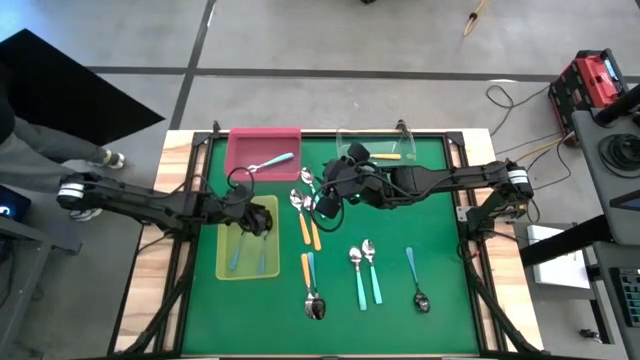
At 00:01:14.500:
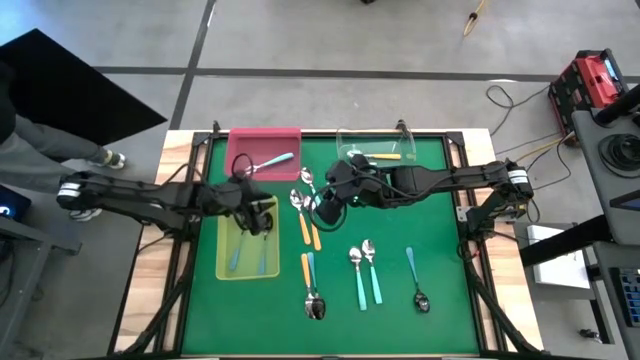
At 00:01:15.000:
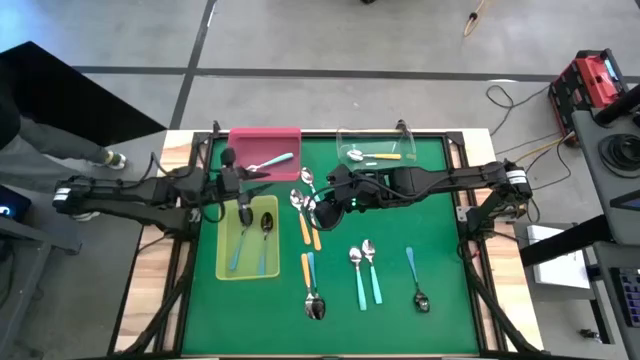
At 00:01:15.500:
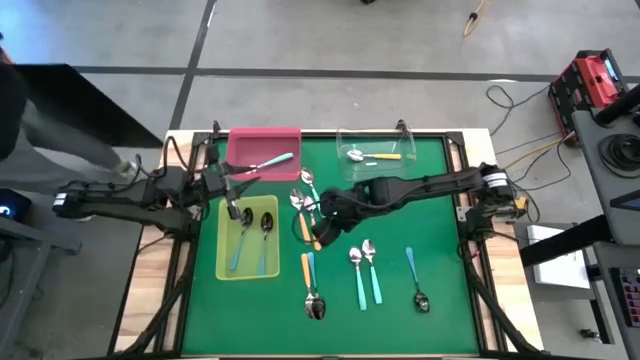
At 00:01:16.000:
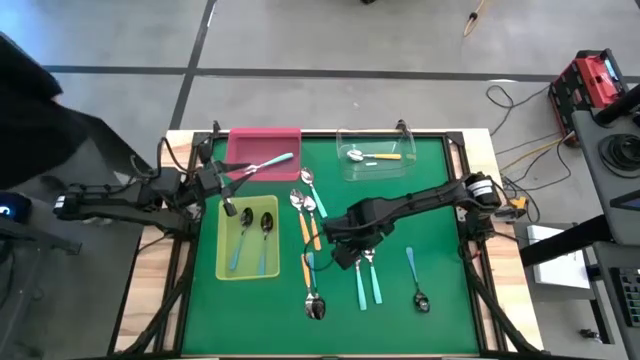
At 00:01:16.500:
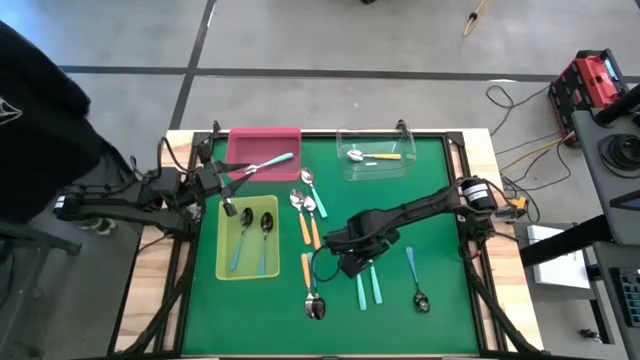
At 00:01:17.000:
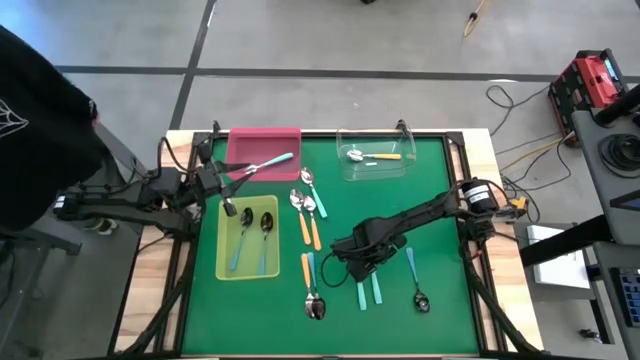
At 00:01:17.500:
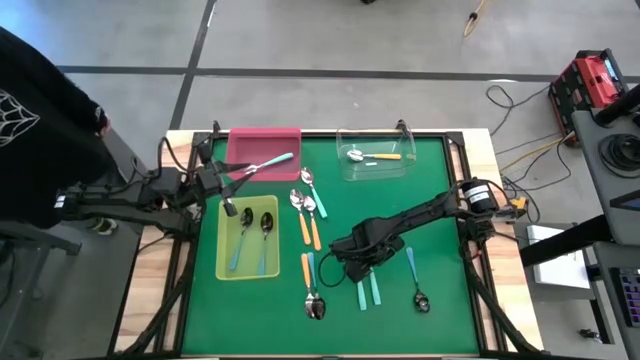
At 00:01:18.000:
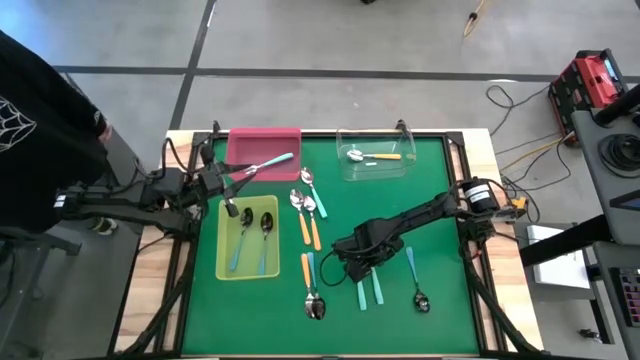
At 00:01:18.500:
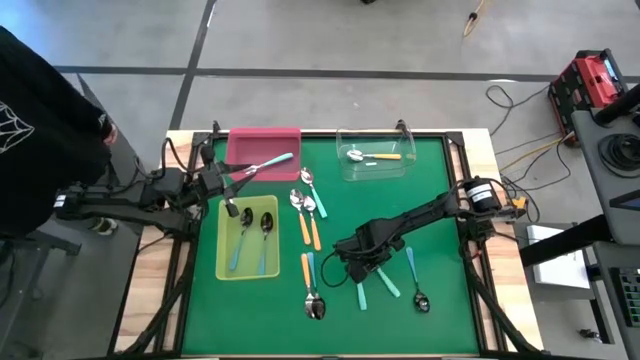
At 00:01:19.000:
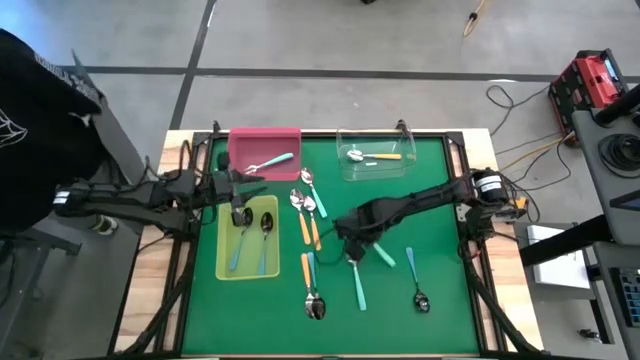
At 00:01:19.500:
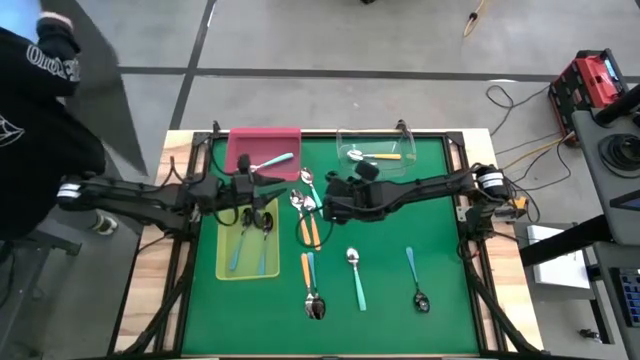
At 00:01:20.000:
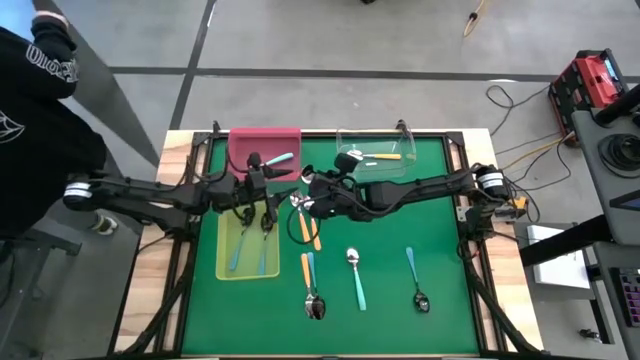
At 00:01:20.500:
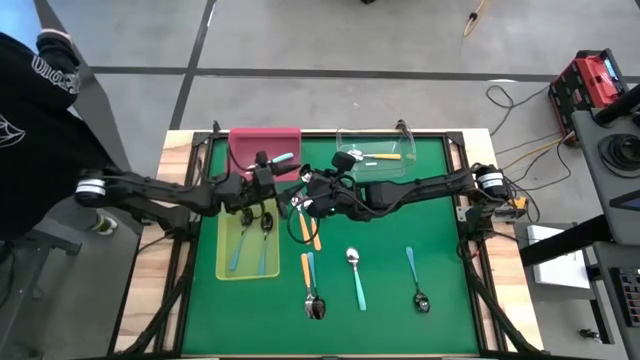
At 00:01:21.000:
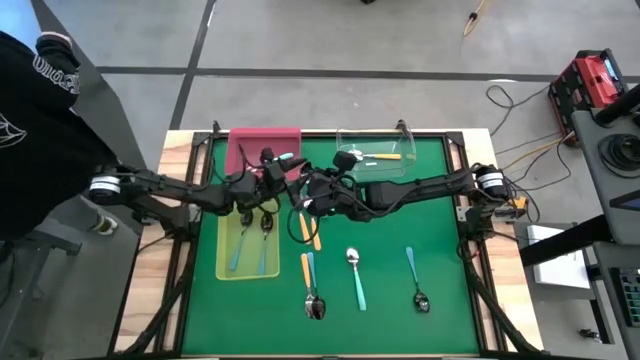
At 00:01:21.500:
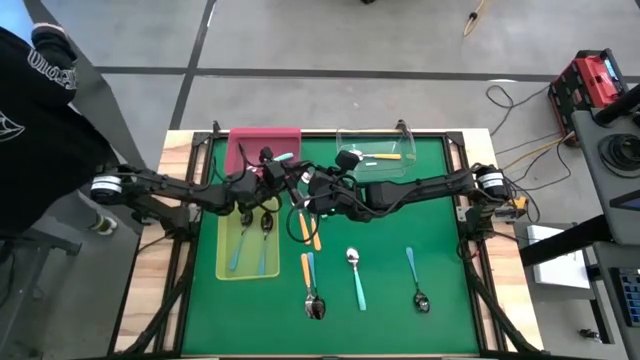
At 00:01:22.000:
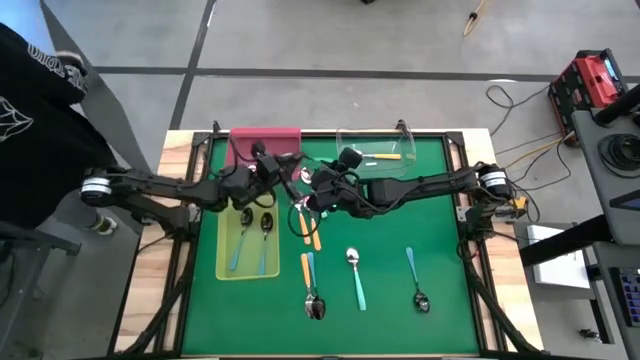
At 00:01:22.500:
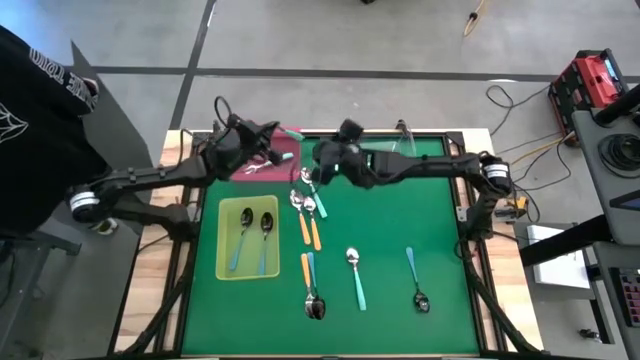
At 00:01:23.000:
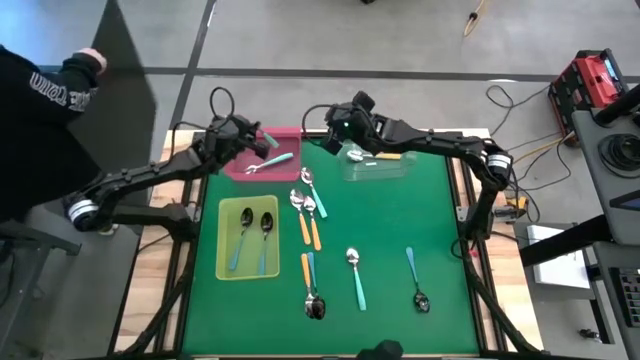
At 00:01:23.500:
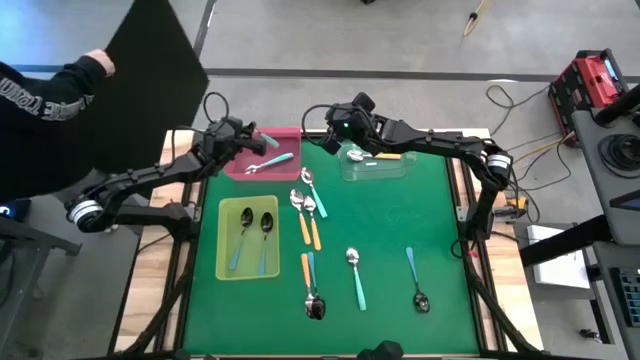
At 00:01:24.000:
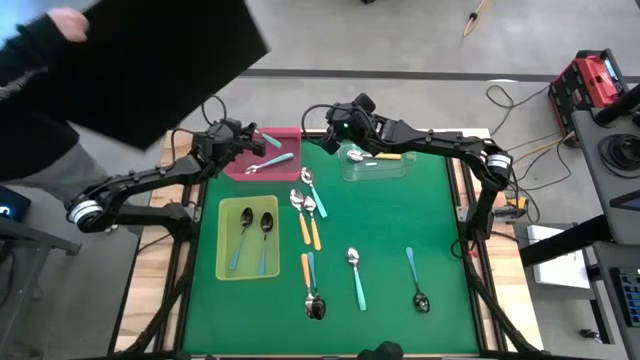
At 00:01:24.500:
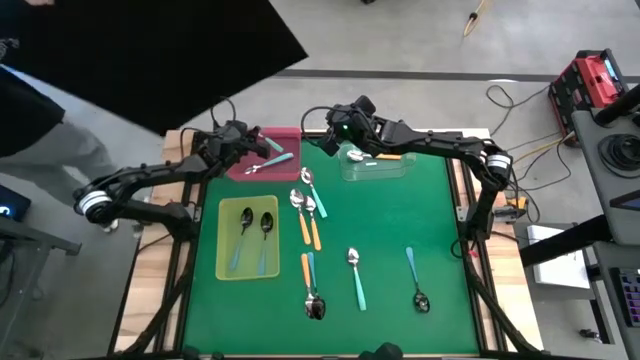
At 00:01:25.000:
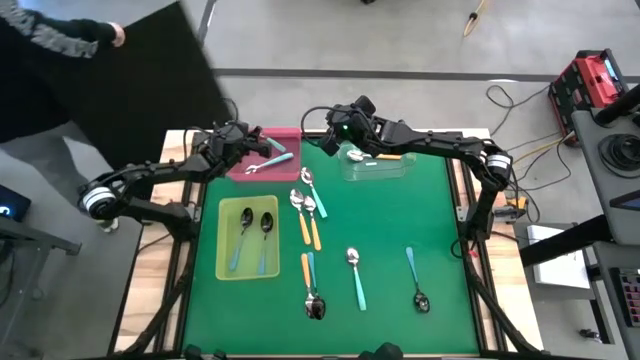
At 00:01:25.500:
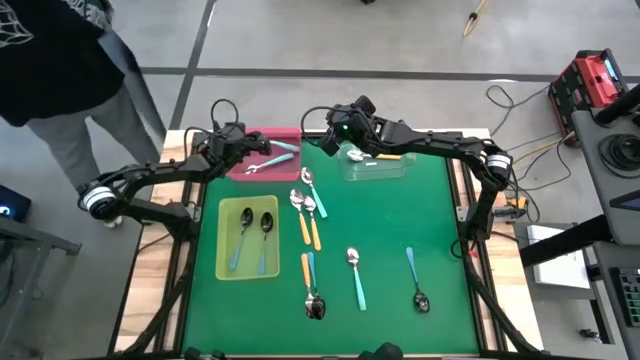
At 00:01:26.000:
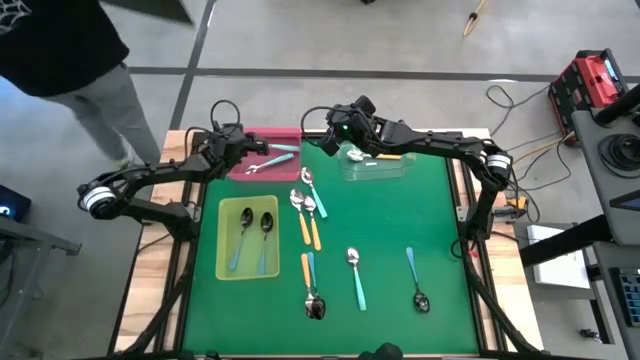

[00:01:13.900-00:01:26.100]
Task: Sort silverware by color (type)
Put the light blue spoon into the red bin

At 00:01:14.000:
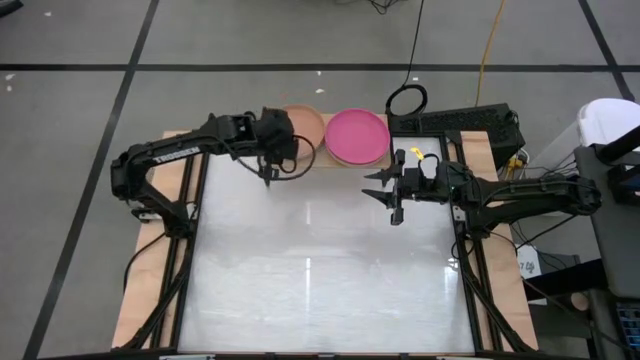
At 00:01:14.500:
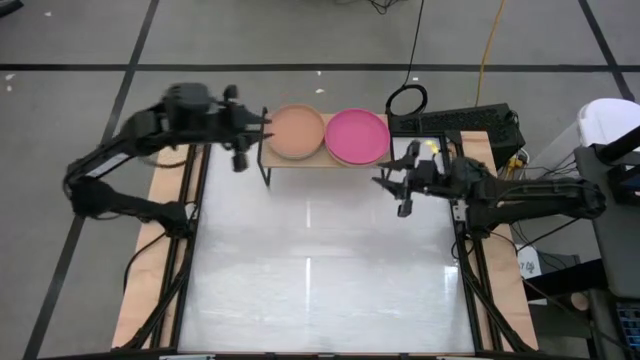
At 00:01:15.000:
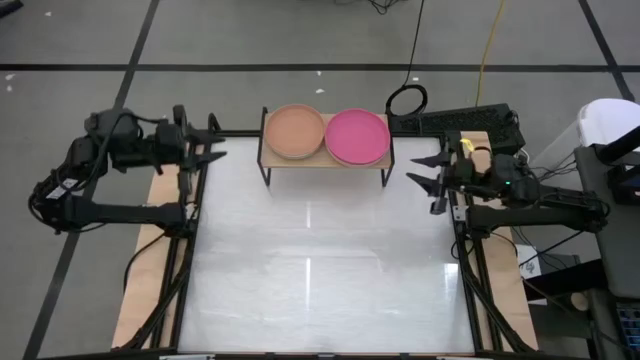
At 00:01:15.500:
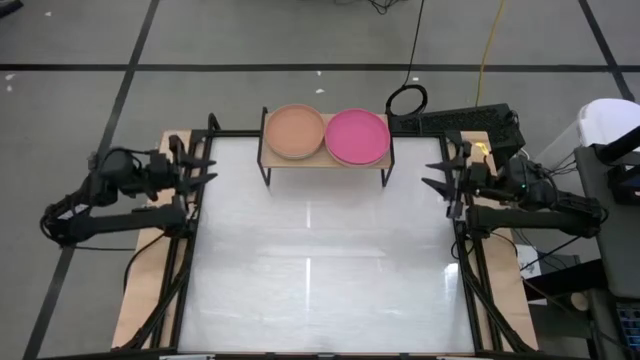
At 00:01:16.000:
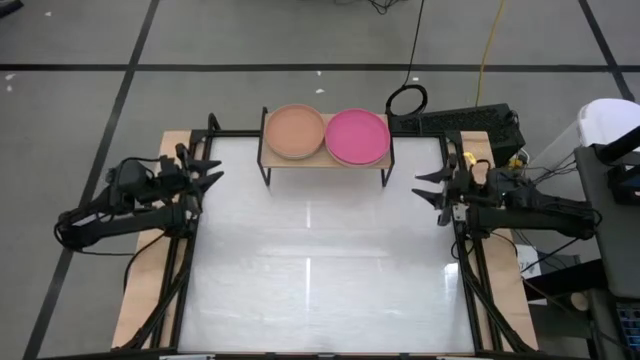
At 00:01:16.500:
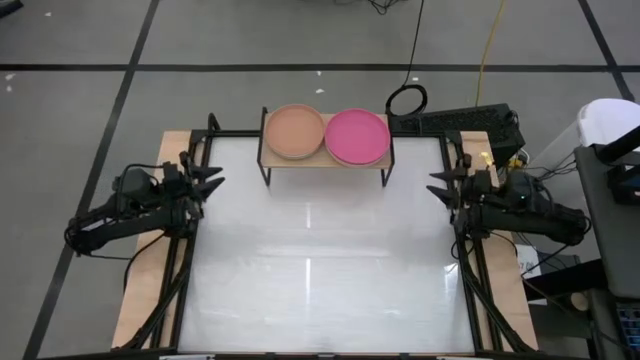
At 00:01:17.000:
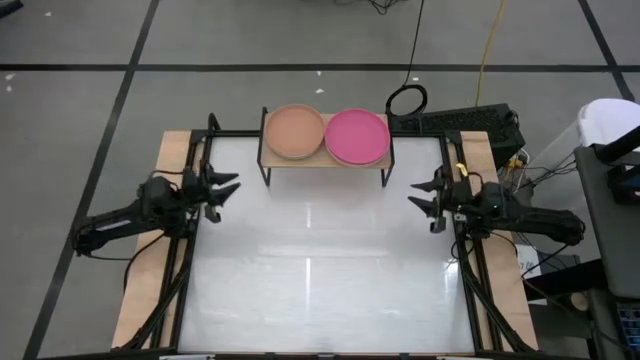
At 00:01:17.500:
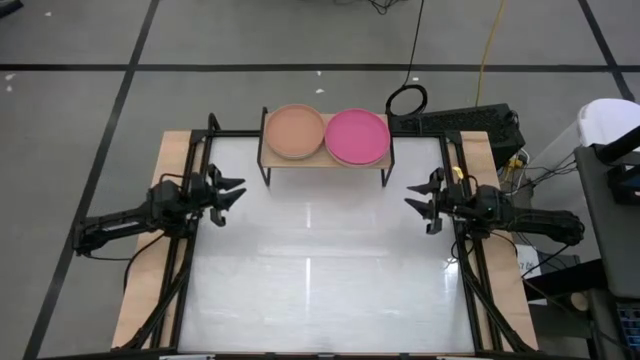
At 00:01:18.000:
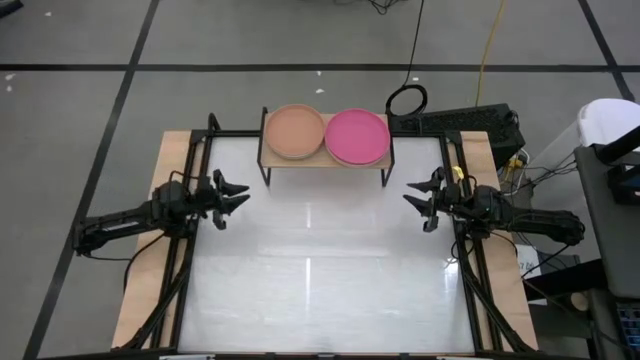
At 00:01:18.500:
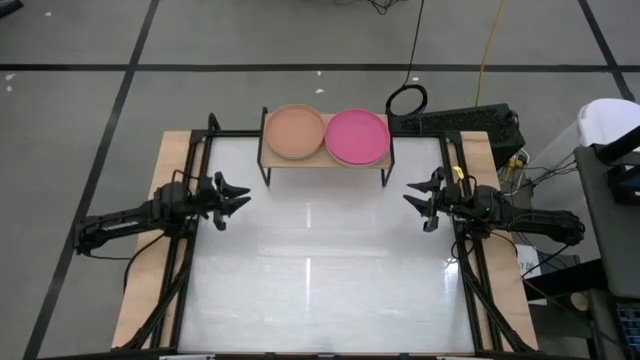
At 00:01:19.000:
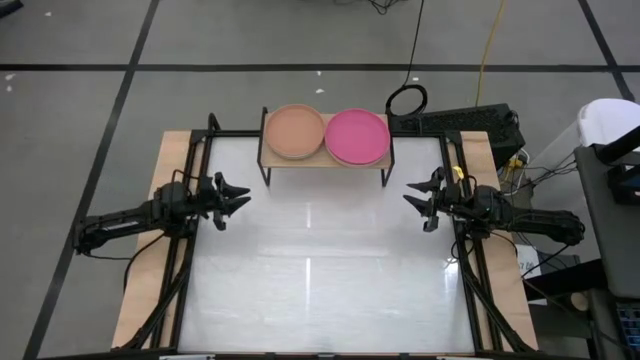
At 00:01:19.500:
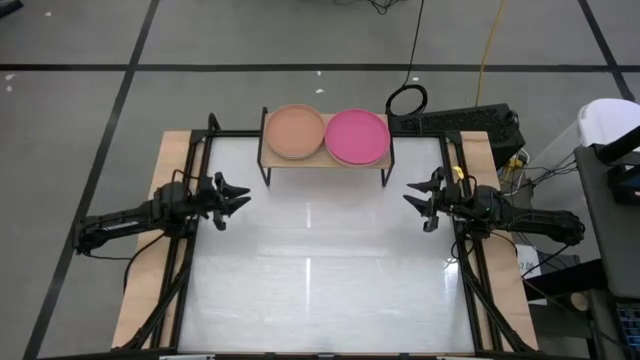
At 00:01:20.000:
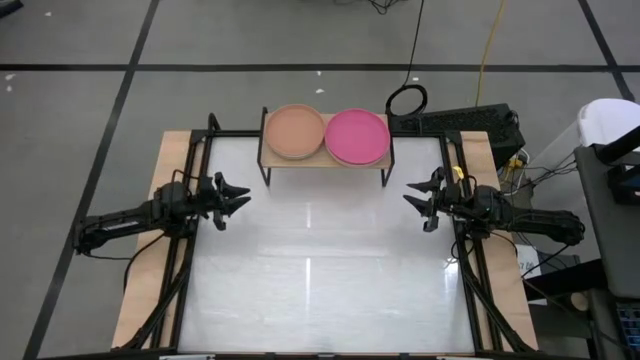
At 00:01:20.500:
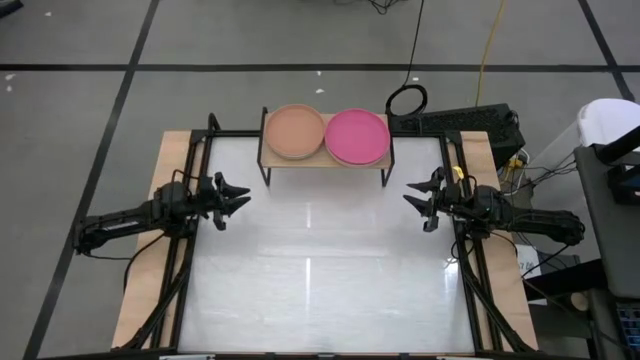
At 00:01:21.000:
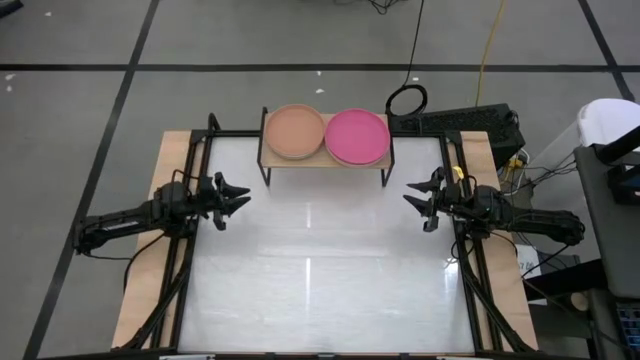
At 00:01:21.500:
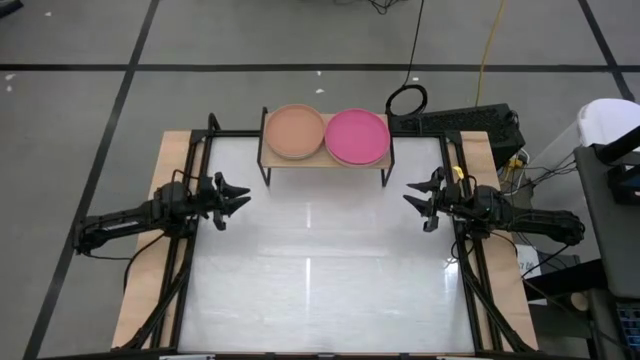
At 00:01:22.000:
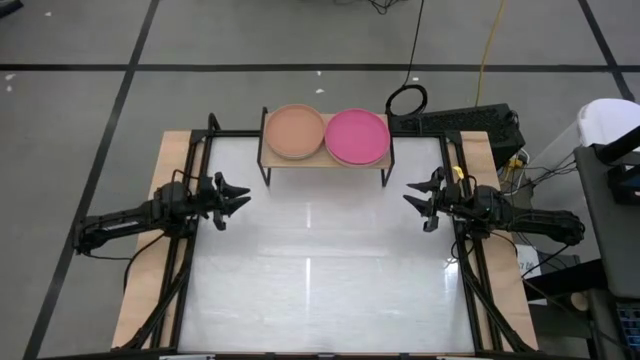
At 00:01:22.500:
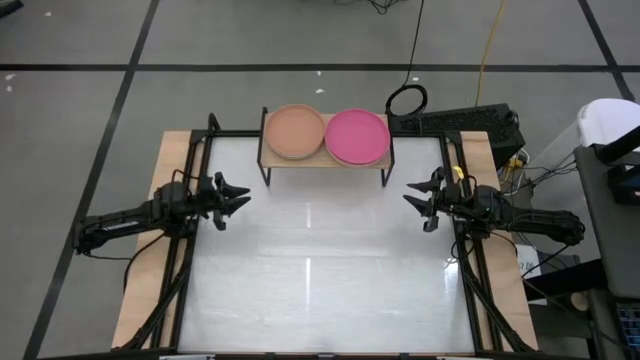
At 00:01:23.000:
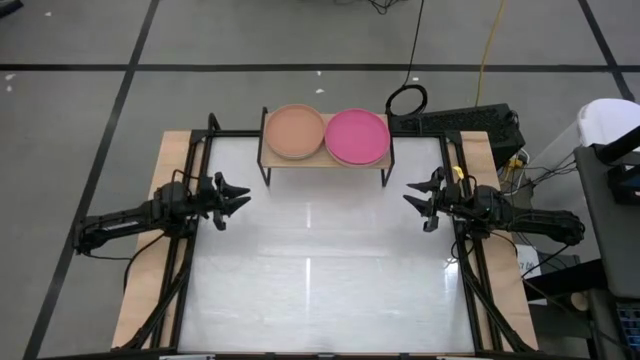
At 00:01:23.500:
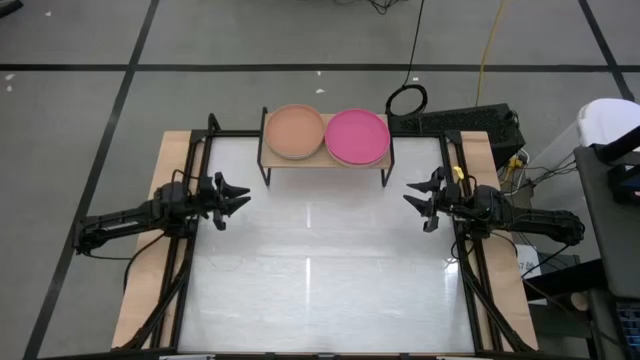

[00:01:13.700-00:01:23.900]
Task: Place and stack plates onto a shelf
Return to Home Position
